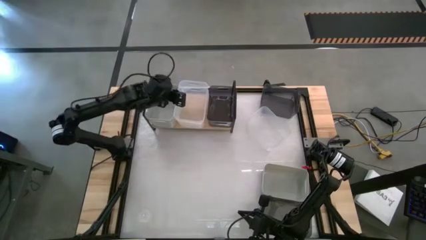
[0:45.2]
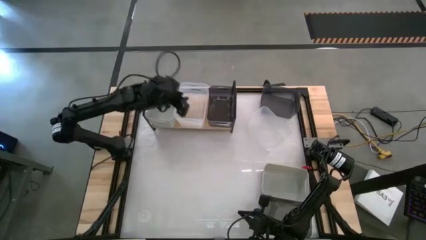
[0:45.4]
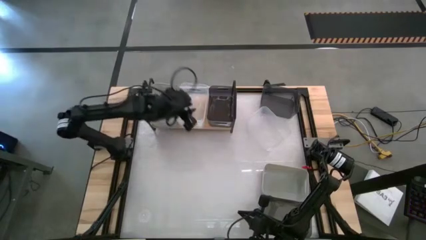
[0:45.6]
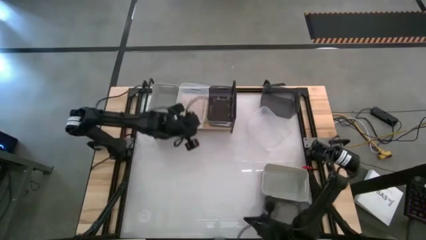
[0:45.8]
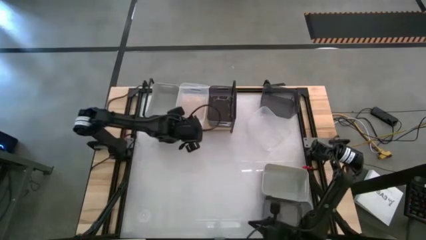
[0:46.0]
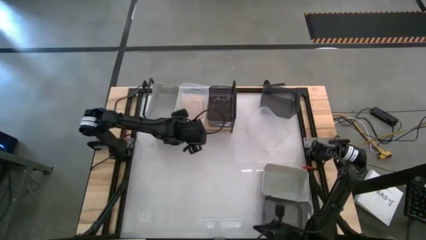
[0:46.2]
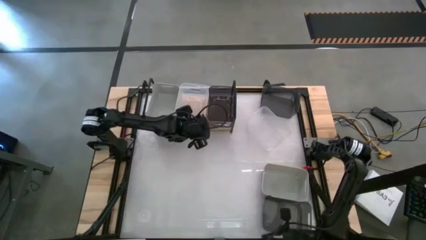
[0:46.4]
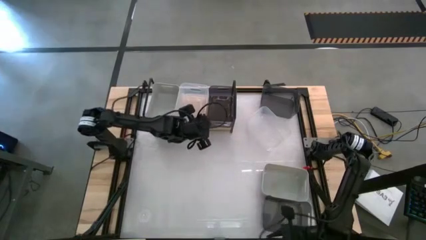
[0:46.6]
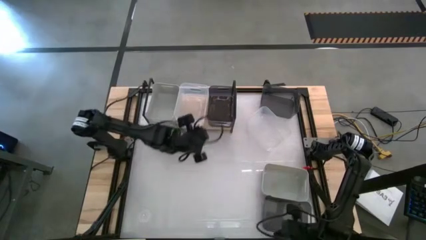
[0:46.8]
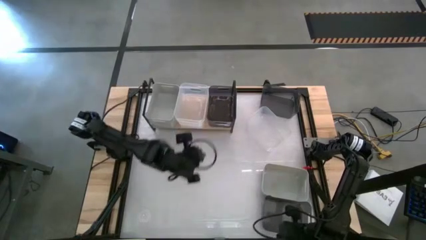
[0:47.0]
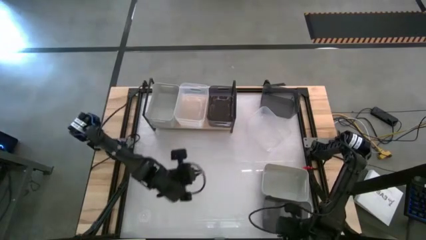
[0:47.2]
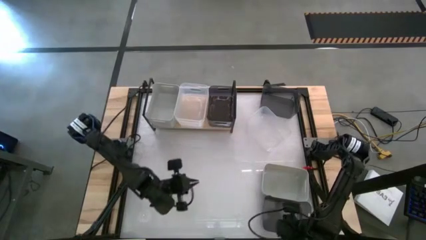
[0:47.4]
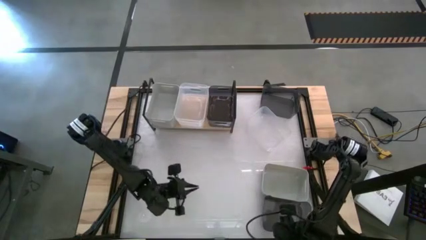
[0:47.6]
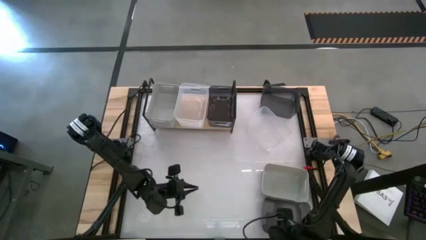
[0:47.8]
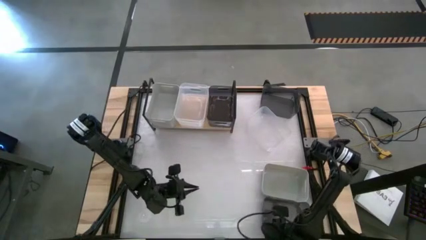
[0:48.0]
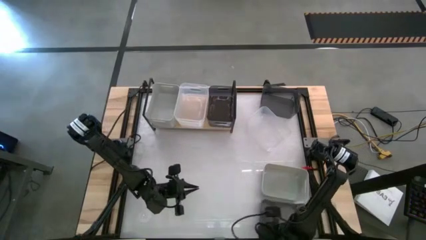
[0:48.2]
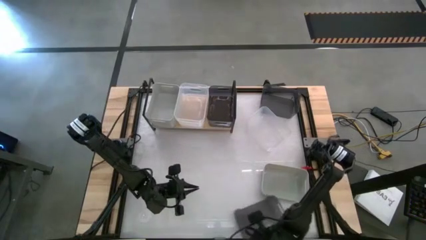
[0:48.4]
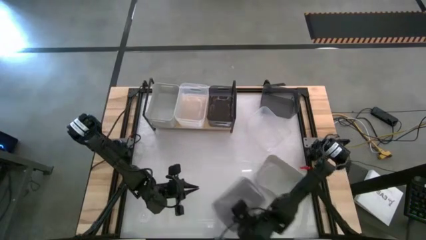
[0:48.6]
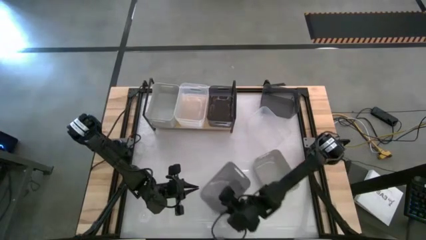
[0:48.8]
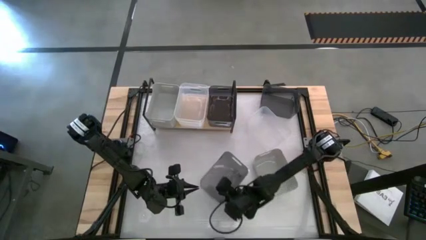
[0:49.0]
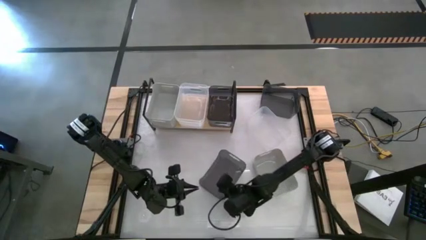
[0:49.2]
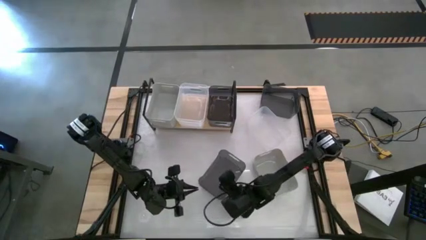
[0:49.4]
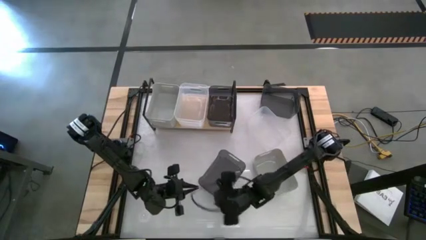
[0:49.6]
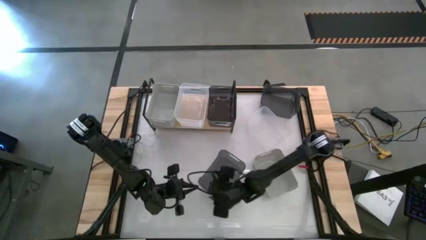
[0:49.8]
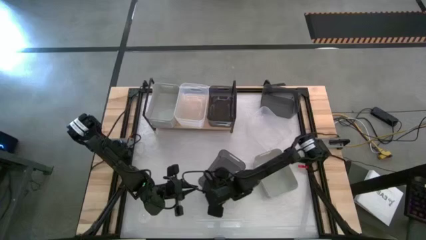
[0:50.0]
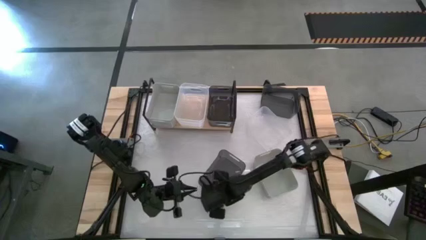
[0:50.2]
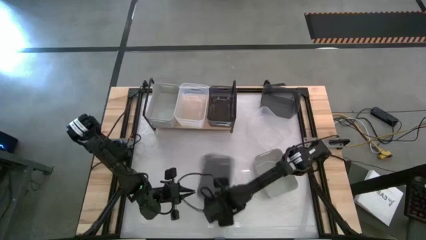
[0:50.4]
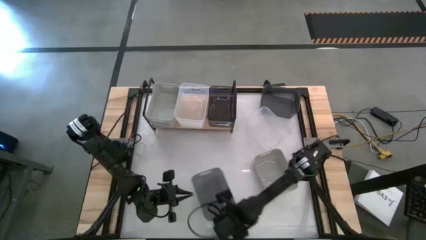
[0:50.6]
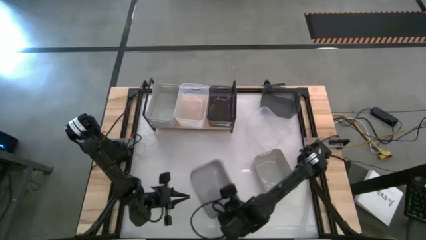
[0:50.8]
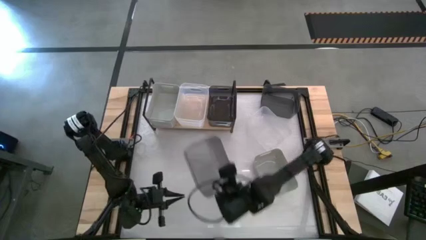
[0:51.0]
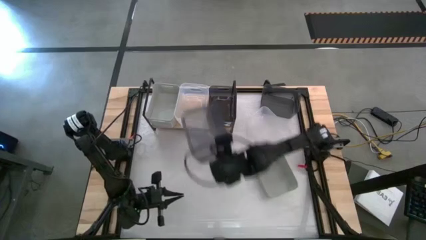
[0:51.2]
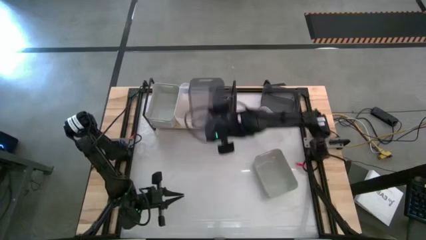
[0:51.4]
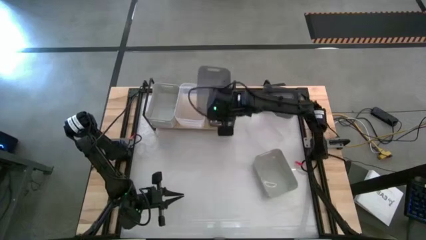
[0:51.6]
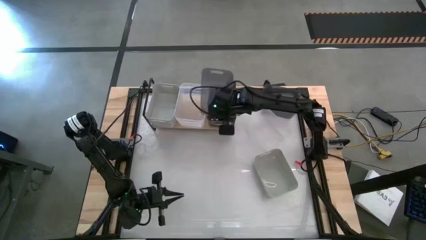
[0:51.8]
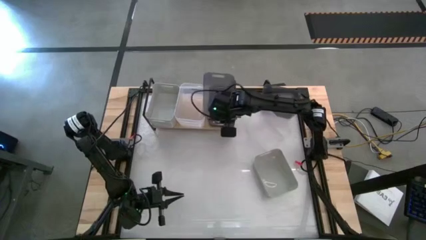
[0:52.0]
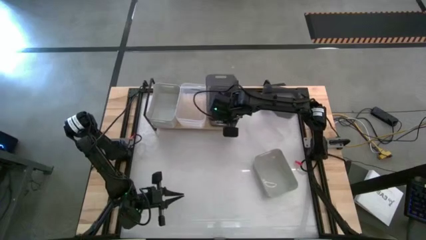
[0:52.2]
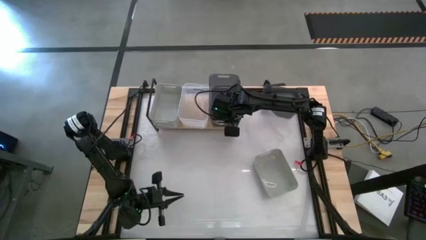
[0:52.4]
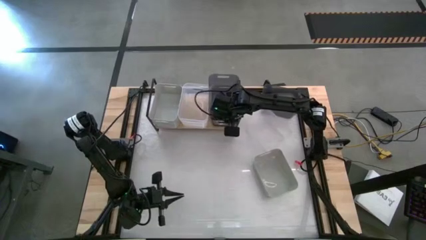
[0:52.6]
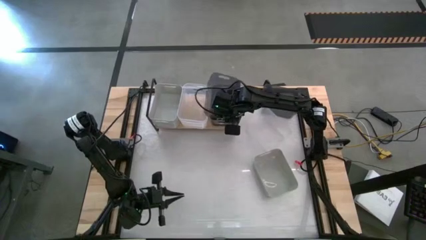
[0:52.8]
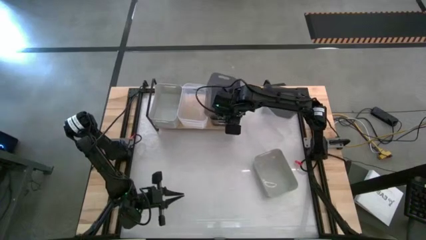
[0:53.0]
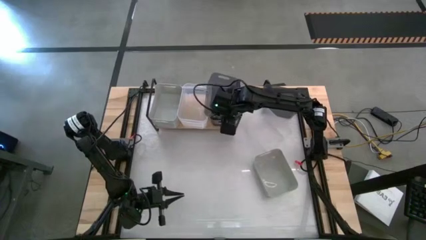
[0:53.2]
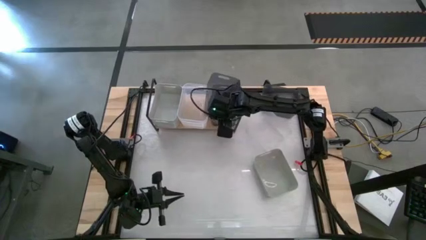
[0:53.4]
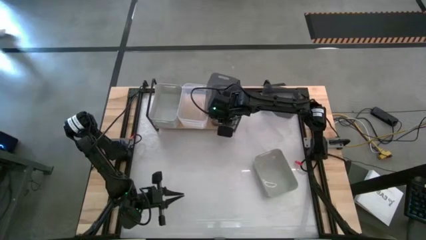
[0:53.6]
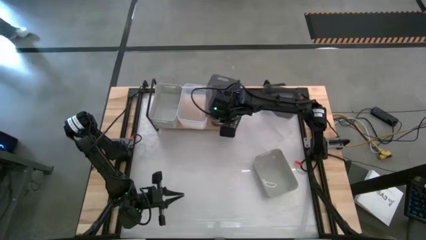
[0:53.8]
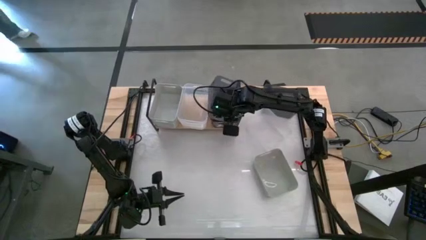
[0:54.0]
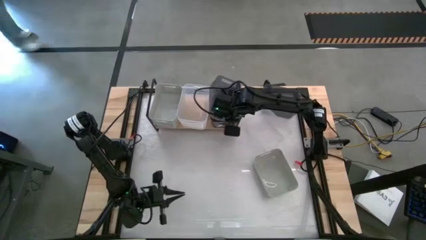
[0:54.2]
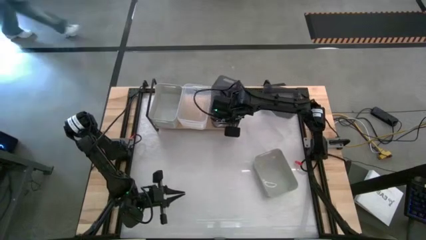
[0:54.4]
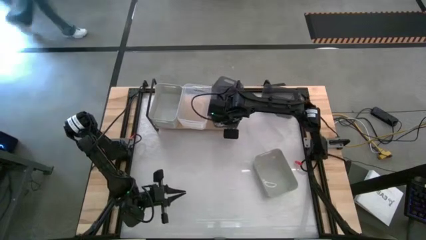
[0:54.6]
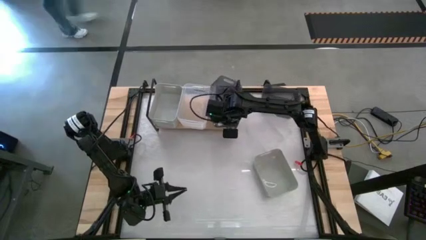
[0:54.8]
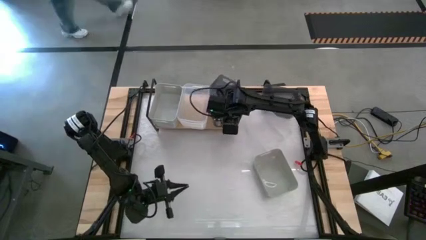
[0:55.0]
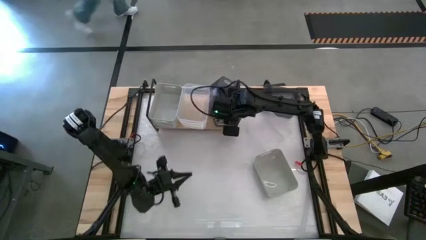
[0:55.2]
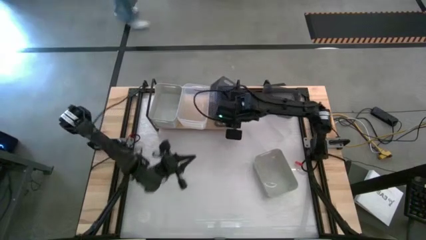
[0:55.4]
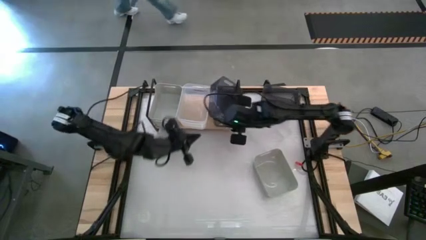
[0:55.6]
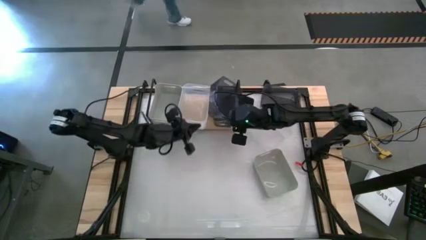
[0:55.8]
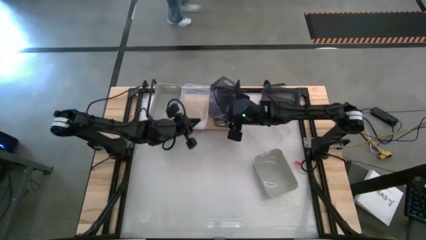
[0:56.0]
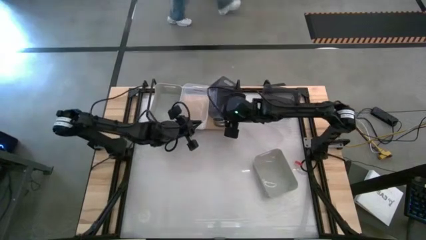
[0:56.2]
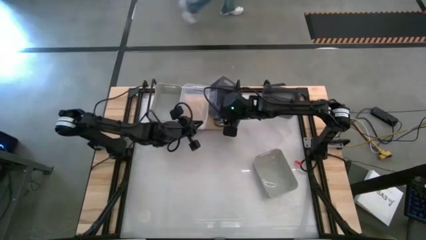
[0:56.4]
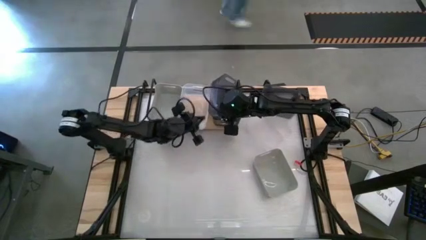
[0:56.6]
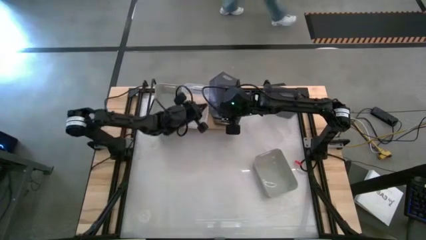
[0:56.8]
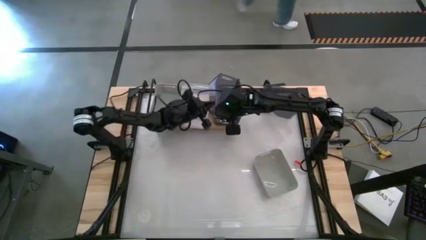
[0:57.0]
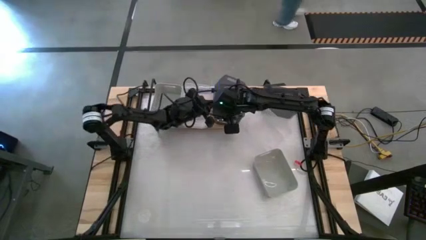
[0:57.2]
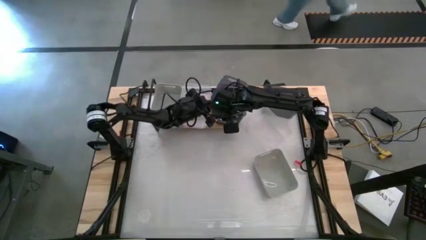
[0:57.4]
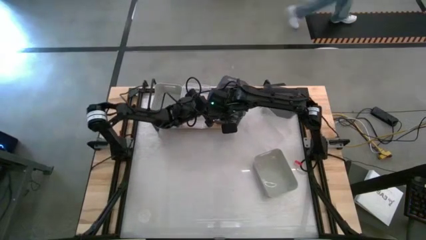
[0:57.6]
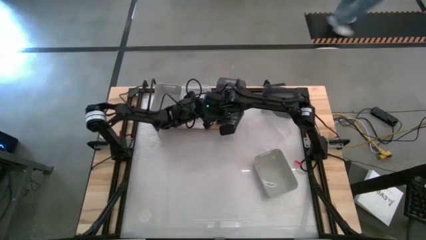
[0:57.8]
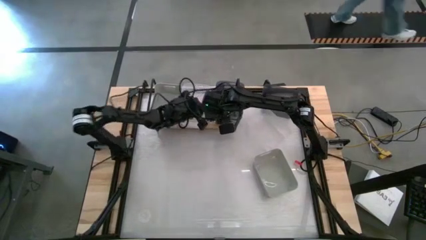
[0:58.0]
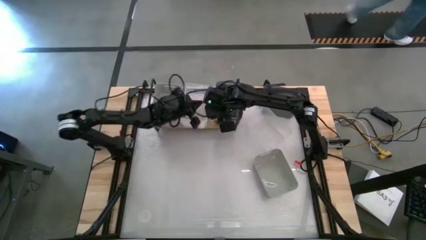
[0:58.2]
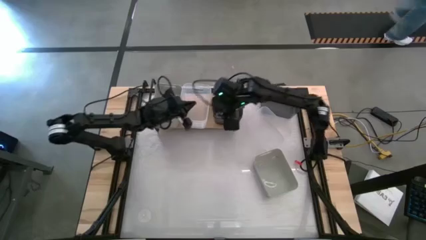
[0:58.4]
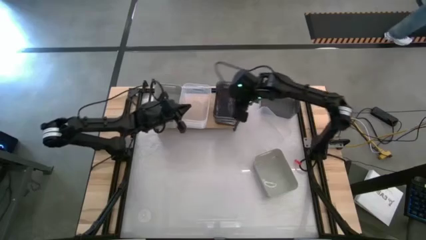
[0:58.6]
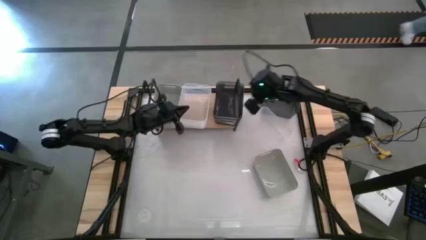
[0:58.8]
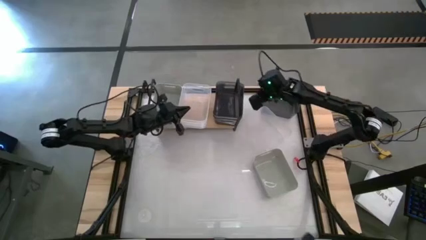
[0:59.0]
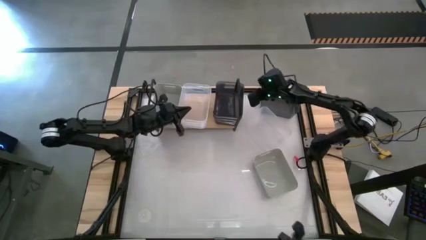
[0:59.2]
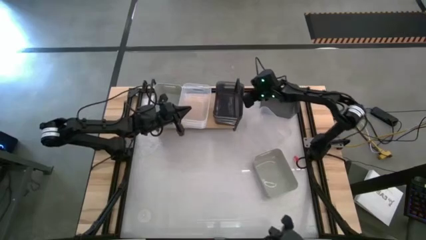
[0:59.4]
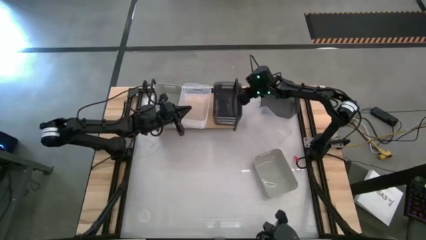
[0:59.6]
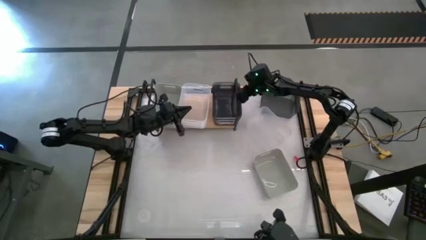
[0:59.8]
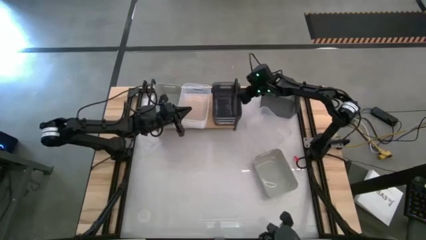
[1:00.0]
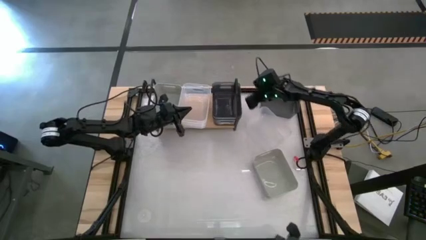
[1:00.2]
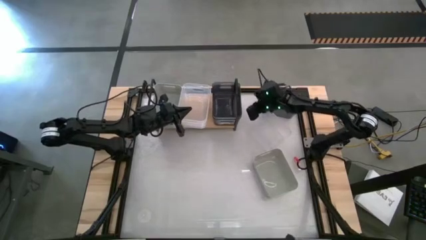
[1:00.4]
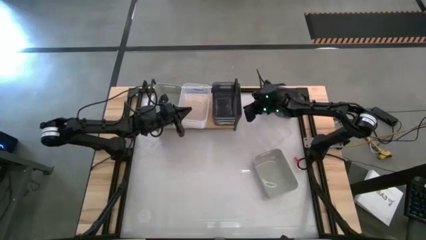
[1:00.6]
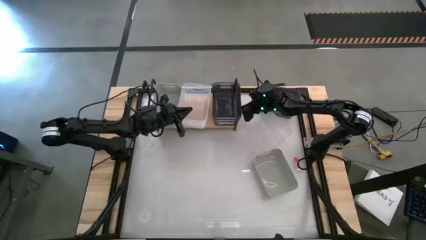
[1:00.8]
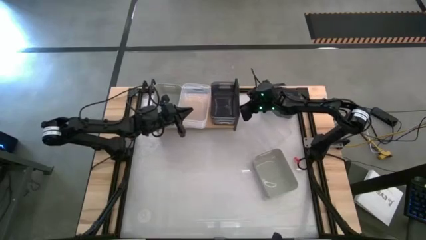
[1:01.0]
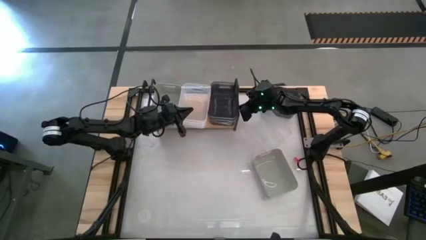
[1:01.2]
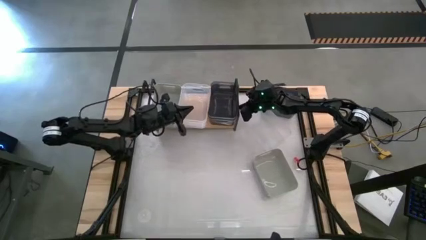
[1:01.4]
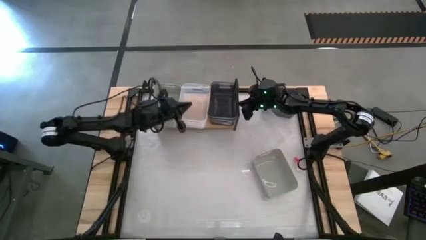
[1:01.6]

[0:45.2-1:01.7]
Task: Stack baskets on shelf by color
Stack the bottom black bin on top of the black bin on the shelf
